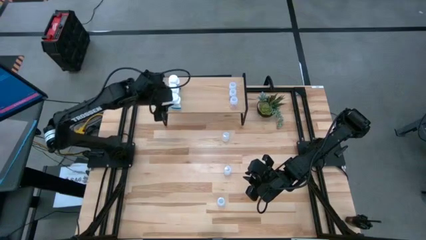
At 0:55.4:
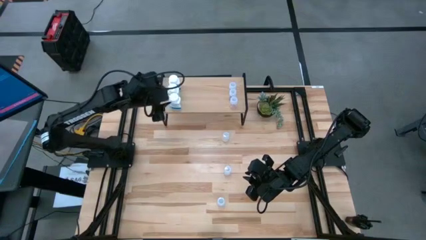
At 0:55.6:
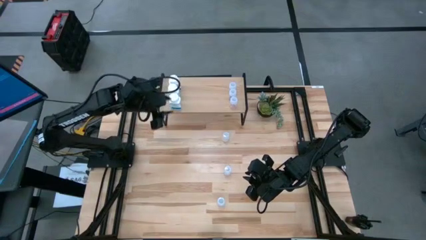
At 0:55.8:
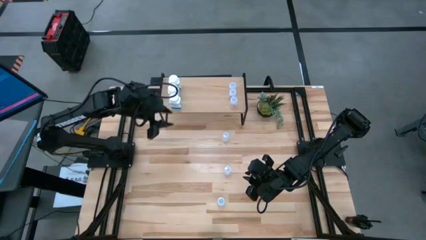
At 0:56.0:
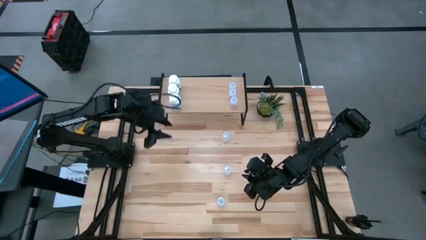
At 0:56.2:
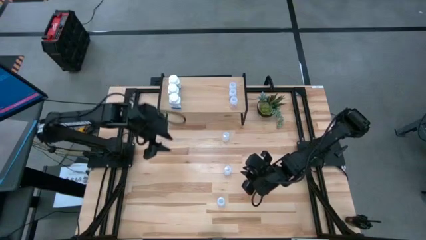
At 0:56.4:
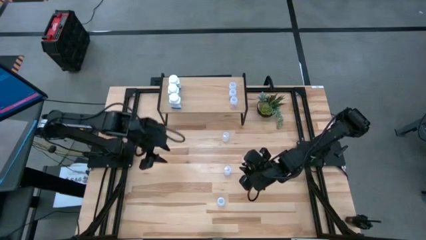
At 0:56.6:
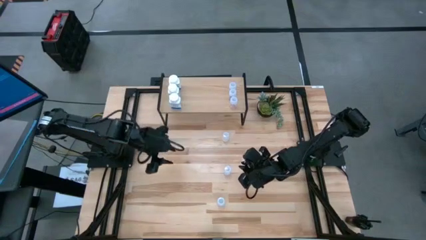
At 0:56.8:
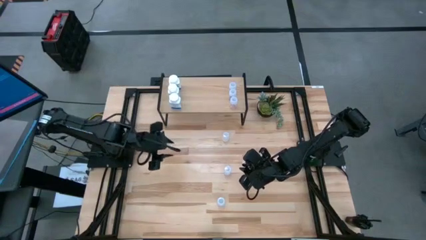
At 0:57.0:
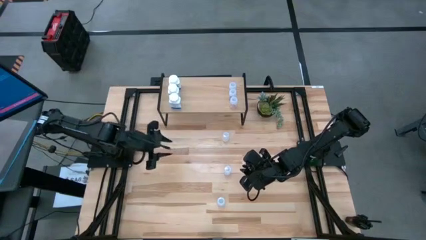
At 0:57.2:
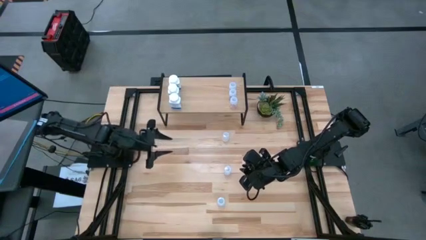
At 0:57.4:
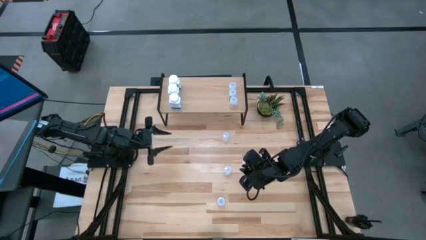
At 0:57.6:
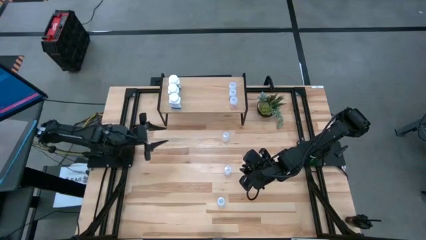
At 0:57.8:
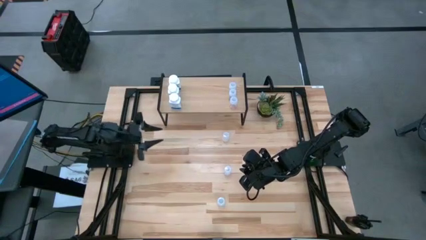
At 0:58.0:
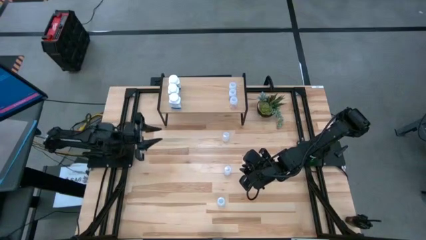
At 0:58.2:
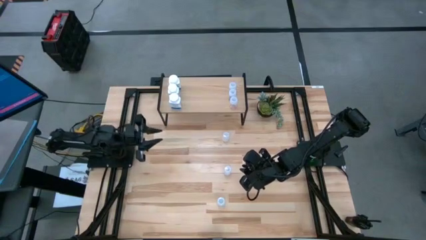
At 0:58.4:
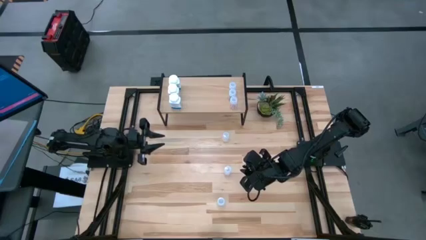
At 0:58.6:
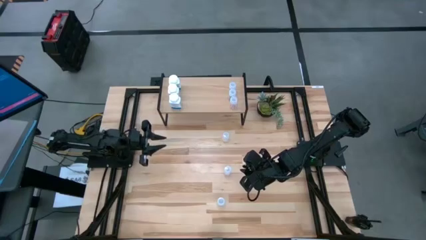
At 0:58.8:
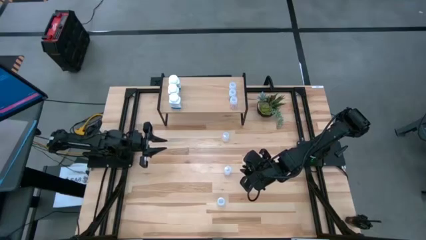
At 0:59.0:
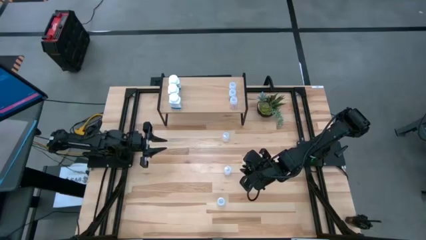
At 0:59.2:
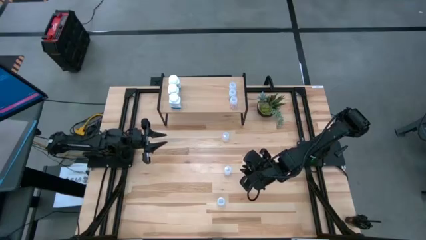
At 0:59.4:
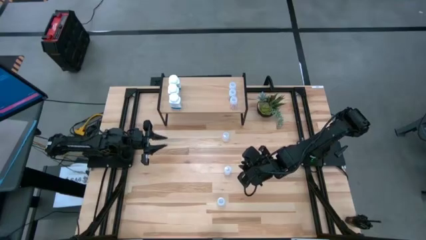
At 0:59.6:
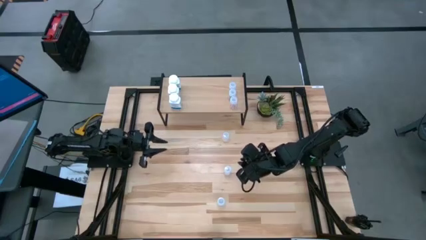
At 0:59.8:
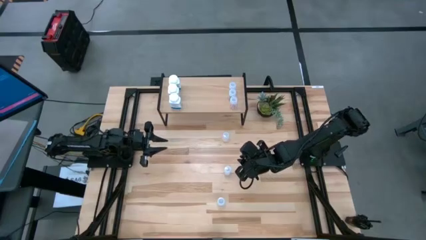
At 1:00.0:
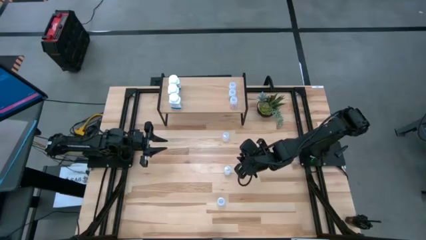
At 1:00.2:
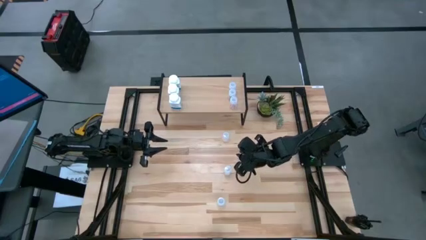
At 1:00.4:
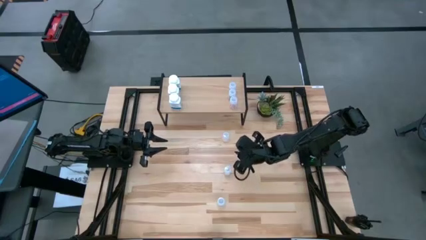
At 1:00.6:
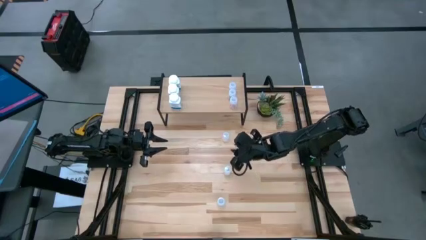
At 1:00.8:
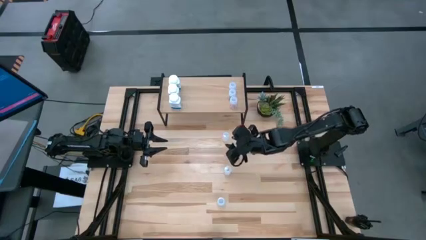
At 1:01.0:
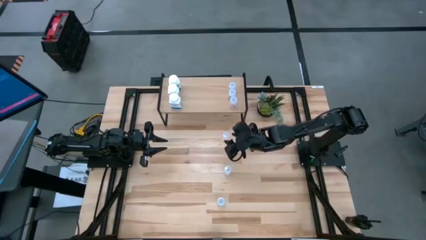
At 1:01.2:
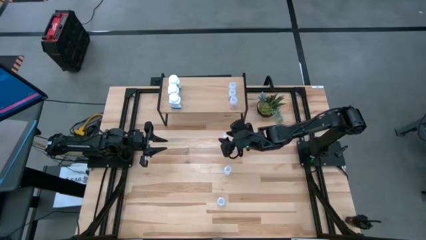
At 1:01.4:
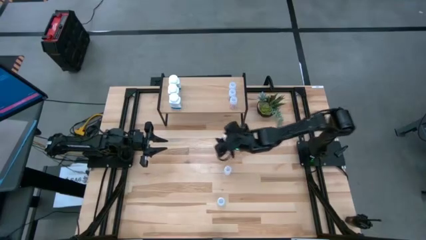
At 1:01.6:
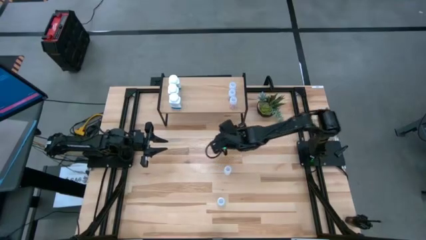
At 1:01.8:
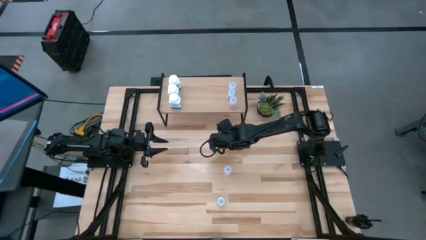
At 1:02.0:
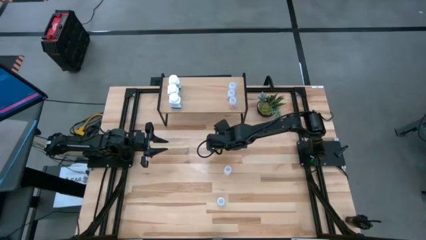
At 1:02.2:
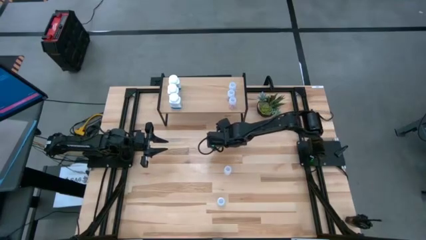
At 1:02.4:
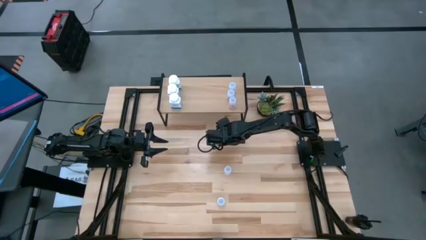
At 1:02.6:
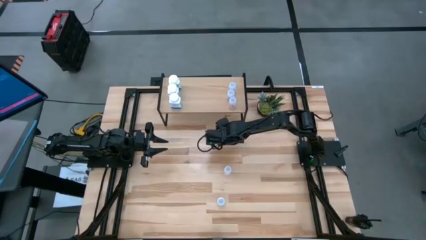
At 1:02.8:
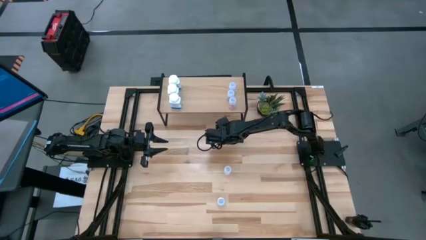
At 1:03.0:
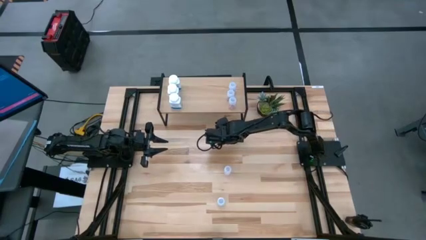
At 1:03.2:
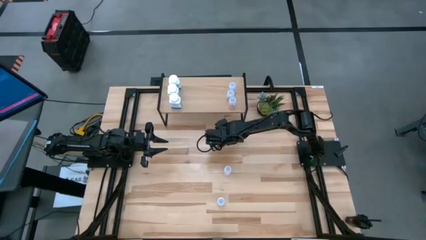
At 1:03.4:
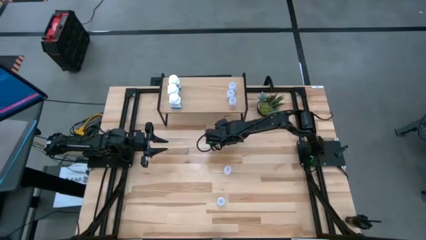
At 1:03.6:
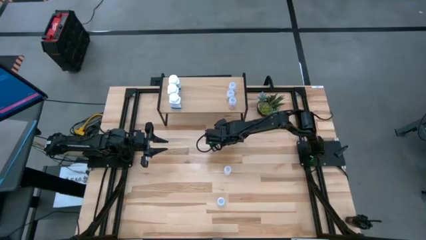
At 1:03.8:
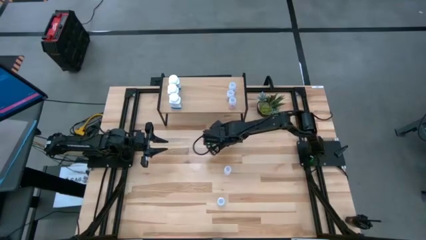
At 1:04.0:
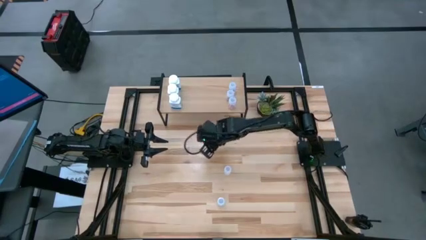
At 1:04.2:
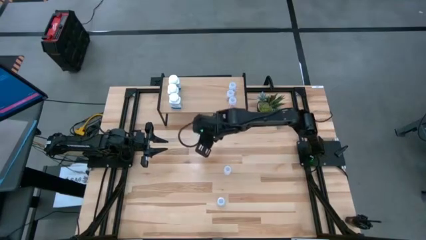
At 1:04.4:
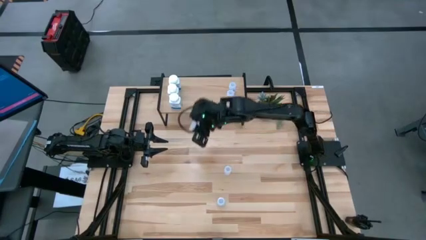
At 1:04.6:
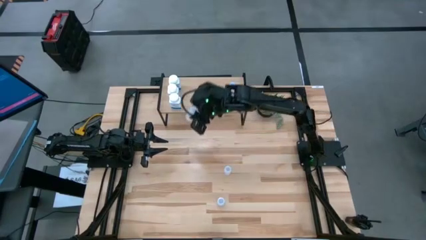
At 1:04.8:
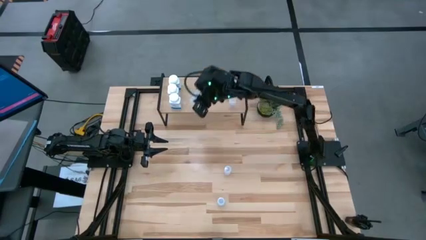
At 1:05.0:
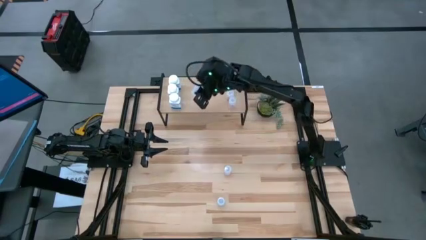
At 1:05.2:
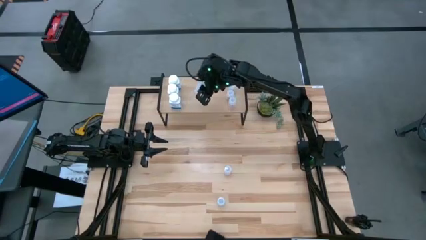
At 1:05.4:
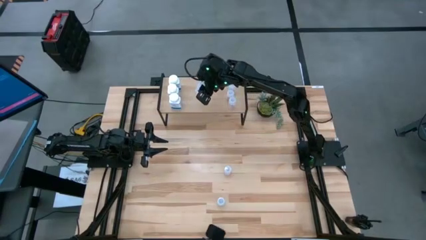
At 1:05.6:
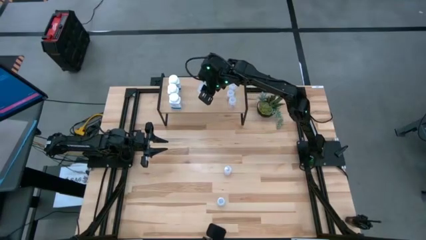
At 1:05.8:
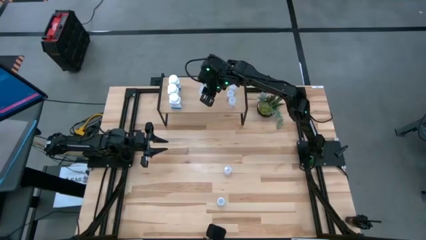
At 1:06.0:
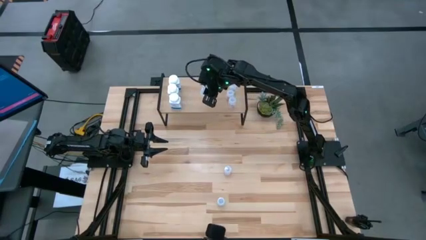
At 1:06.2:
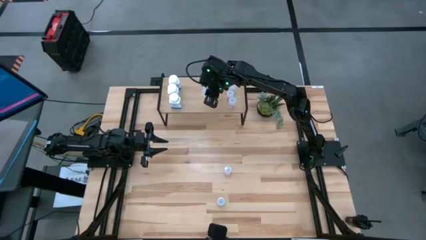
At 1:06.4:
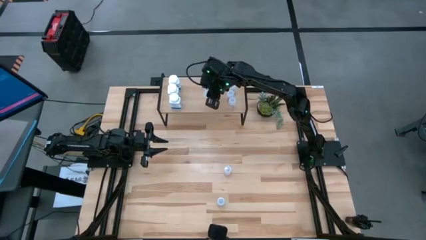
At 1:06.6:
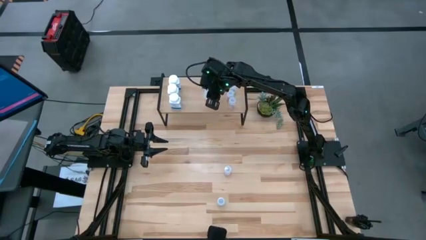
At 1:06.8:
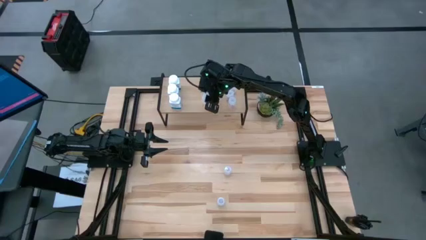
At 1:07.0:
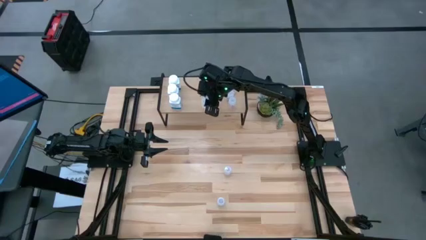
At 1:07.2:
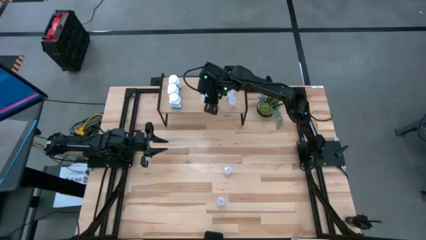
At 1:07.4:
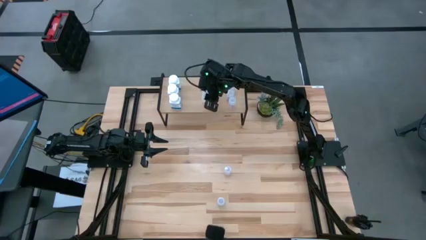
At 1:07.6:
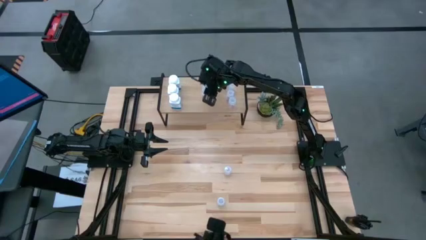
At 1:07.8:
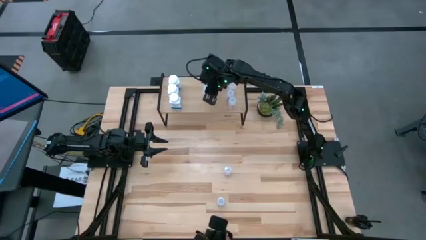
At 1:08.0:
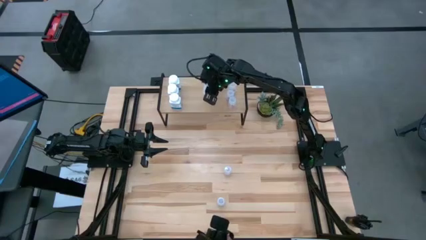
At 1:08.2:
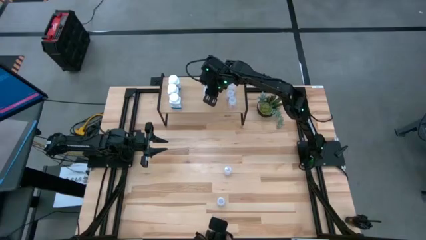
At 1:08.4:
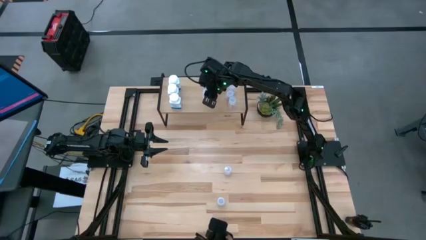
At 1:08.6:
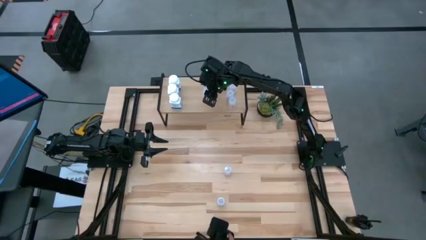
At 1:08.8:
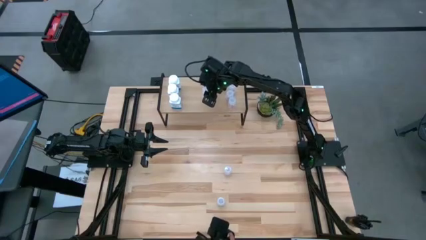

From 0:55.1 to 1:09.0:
Task: Pick and place medicine bottles onto shelf by color
Put the transparent pill bottle on the shelf

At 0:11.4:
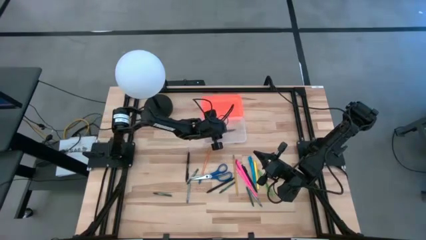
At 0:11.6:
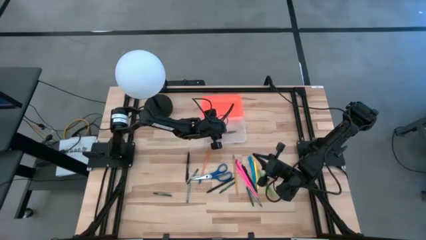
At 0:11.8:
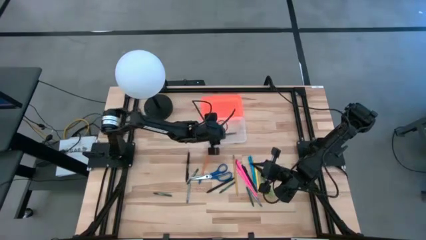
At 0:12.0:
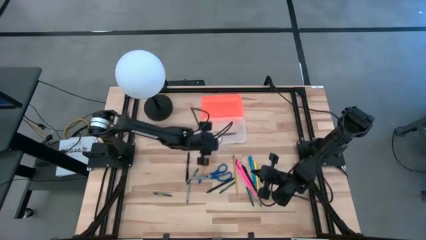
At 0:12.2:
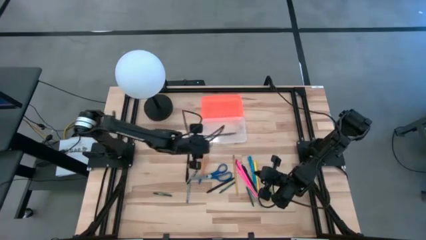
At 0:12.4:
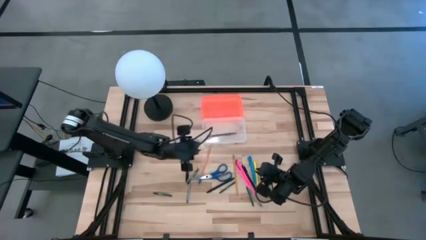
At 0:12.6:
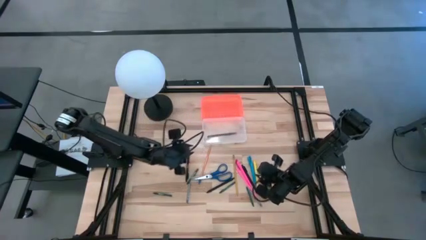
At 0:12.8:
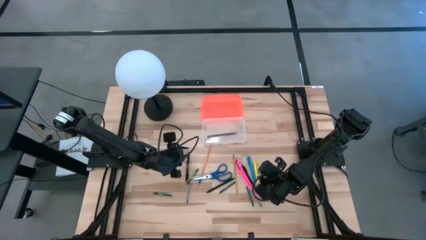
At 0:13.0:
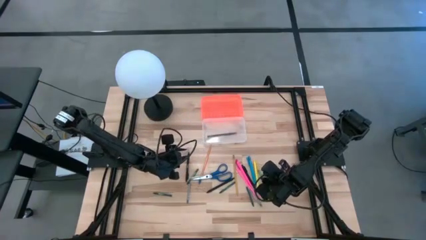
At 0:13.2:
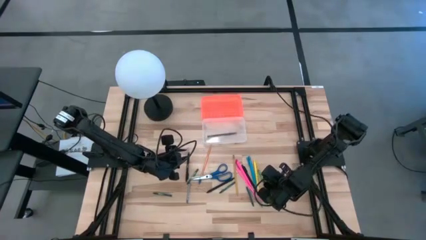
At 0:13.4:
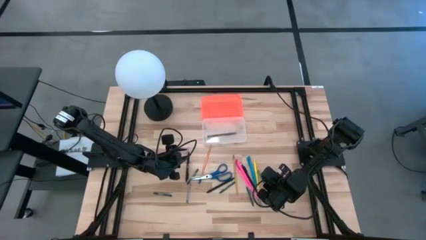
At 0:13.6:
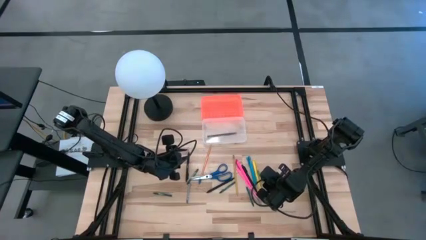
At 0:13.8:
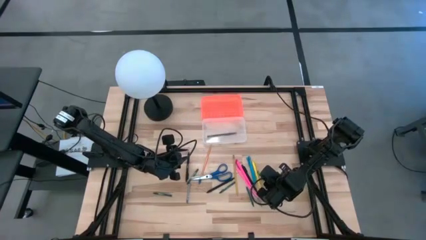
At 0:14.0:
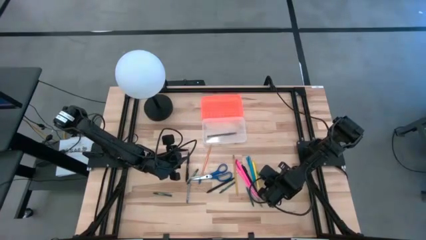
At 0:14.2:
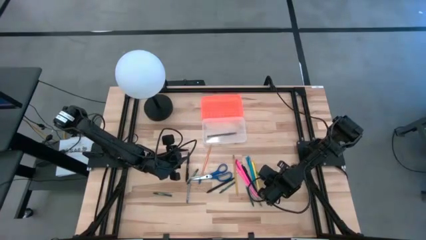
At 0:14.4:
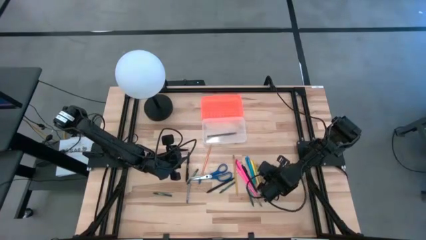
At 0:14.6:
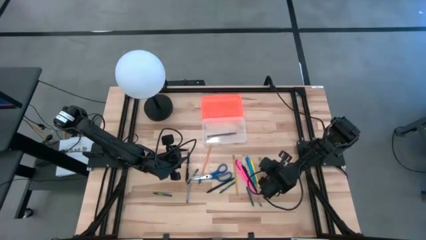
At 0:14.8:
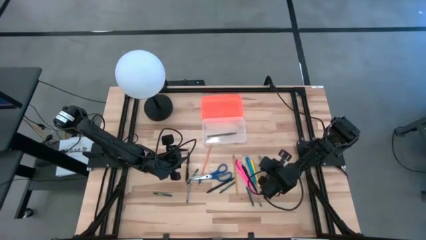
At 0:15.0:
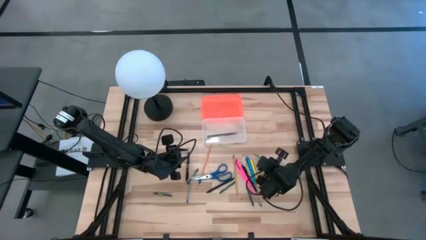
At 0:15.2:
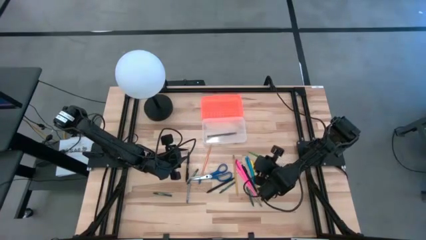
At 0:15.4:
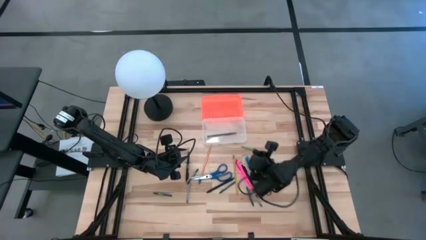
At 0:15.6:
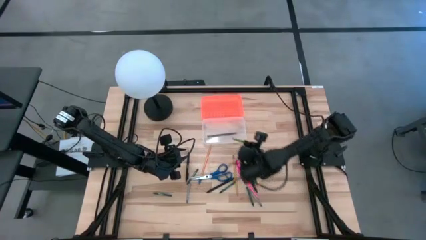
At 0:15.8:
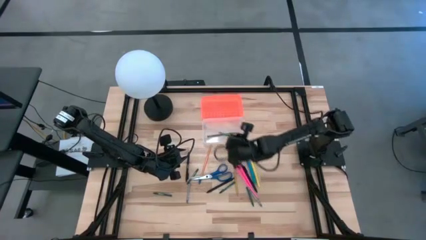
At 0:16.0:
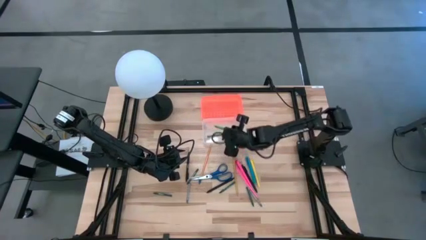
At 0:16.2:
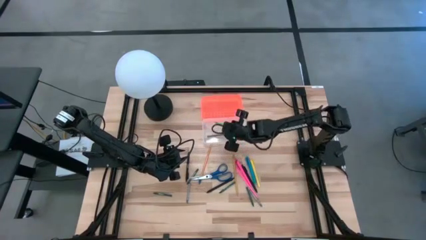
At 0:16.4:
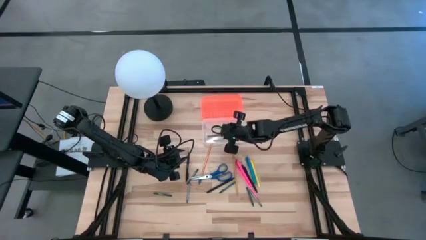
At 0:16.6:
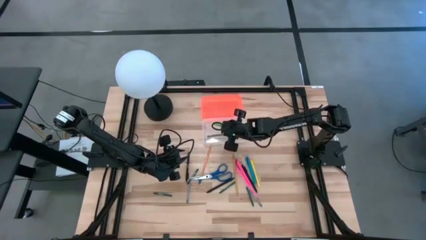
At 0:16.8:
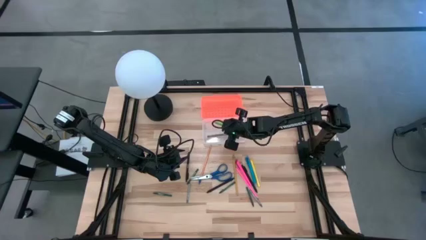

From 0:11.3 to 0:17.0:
Task: Pick & place school supplies into a supply box
Put the green pen into the orange supply box
